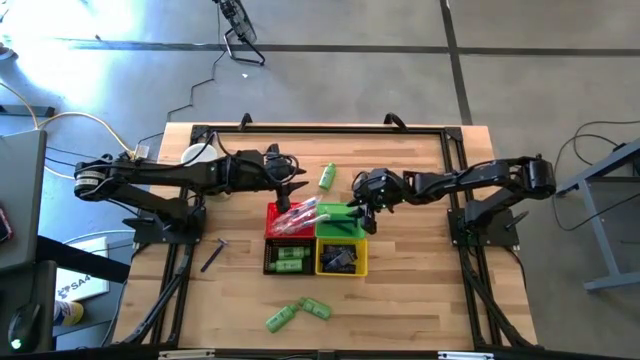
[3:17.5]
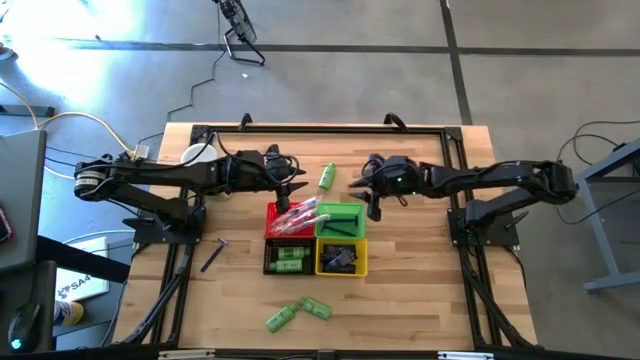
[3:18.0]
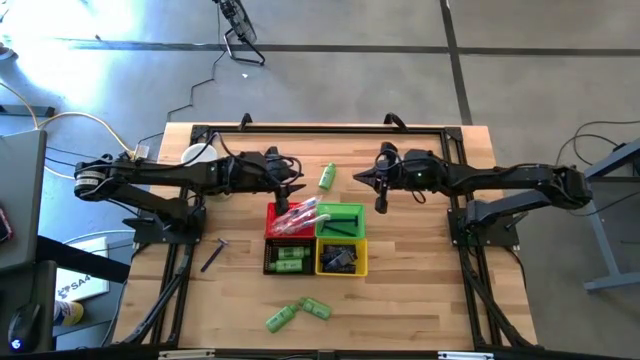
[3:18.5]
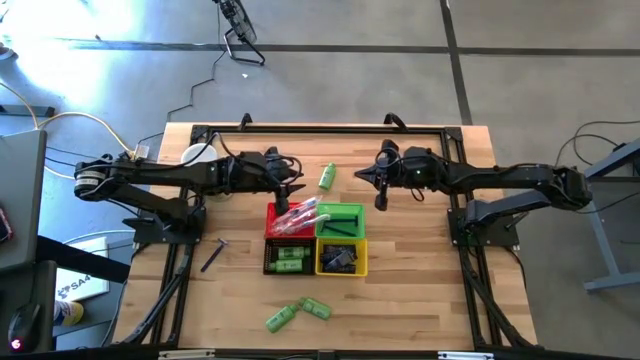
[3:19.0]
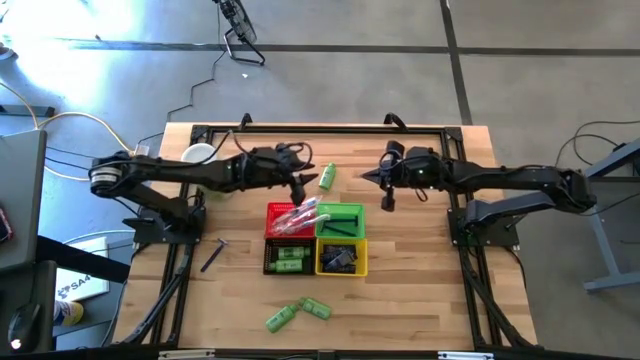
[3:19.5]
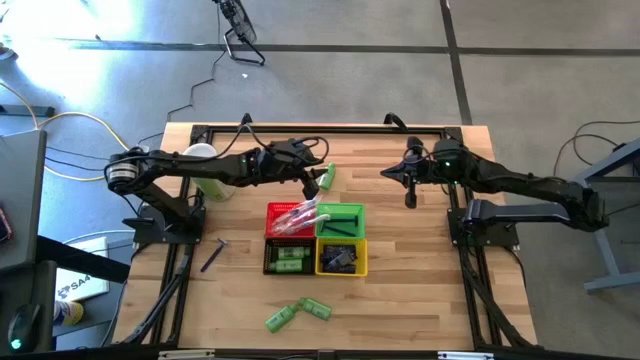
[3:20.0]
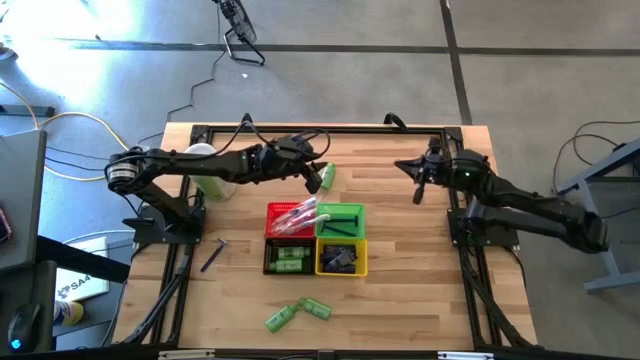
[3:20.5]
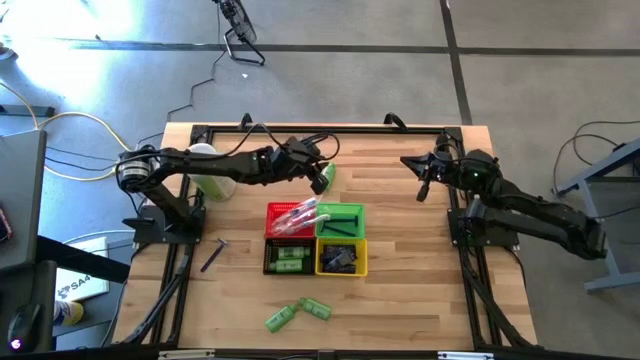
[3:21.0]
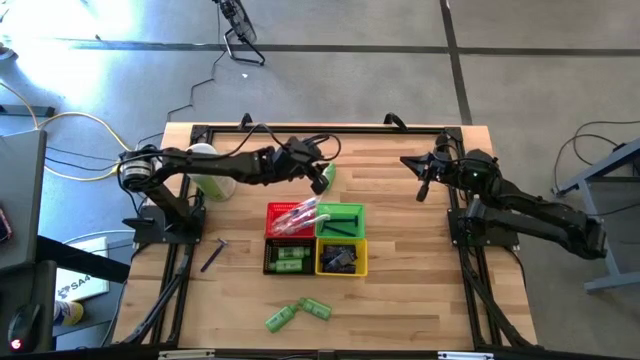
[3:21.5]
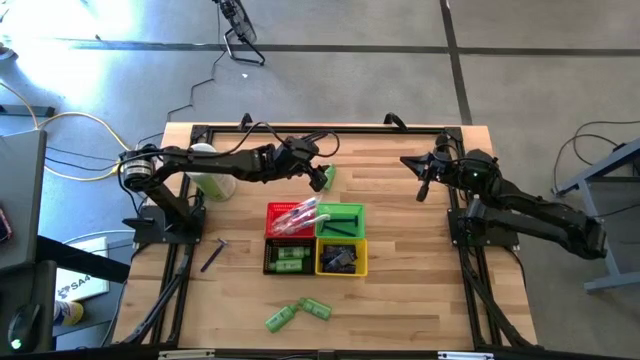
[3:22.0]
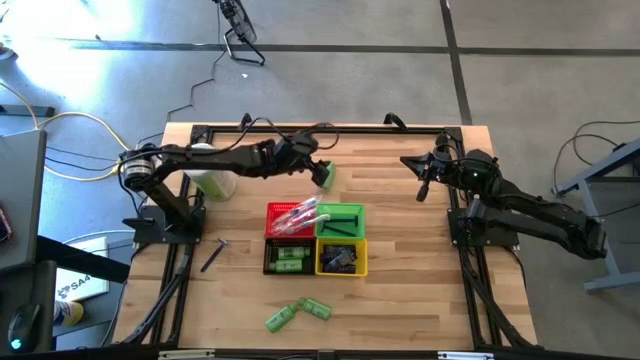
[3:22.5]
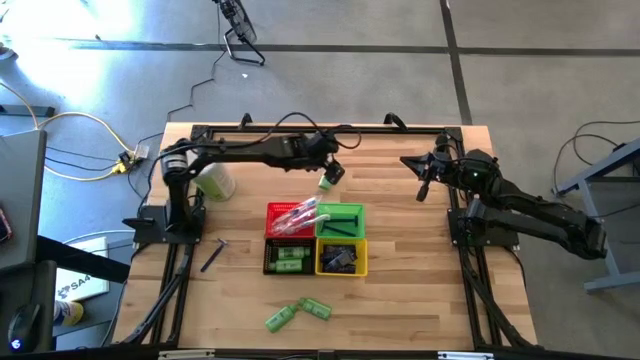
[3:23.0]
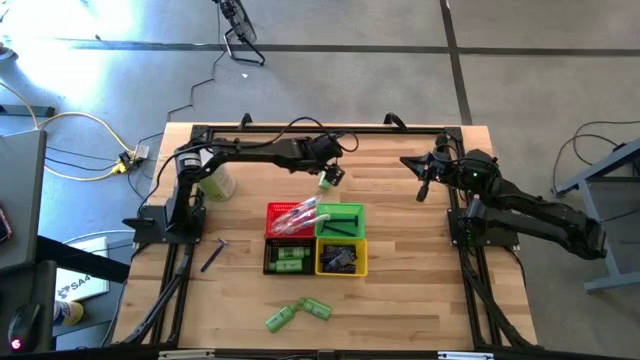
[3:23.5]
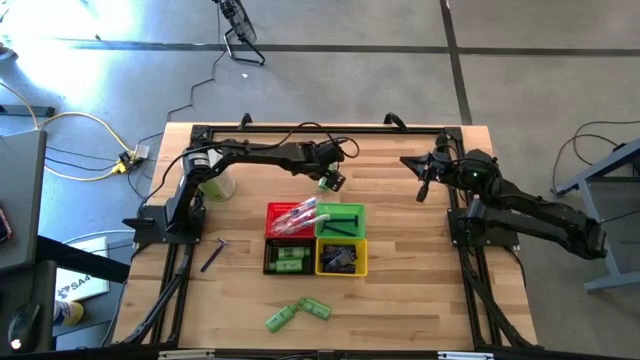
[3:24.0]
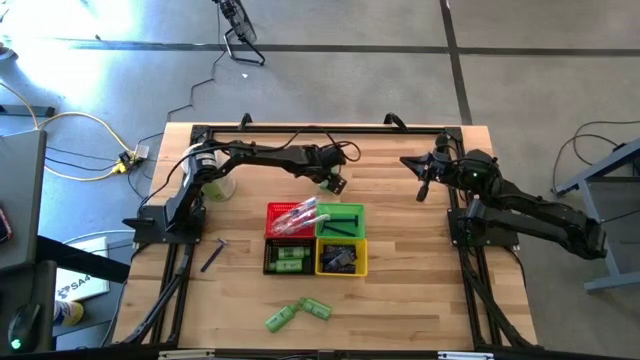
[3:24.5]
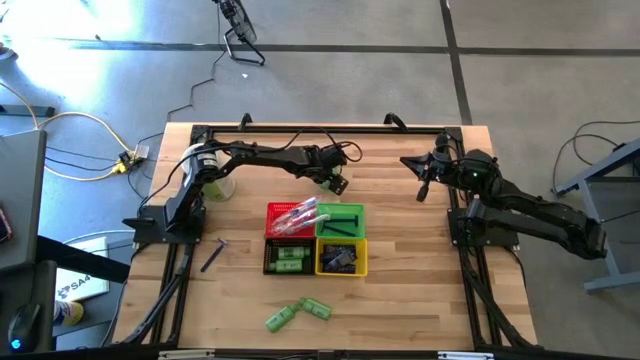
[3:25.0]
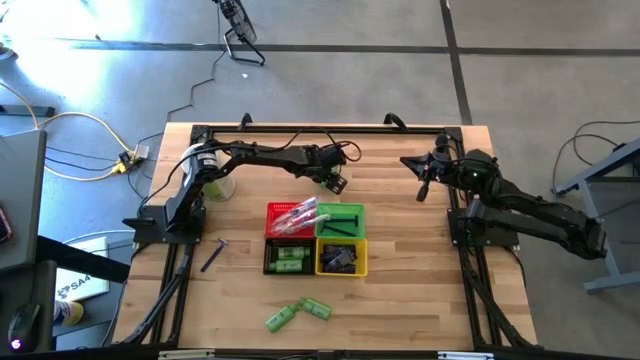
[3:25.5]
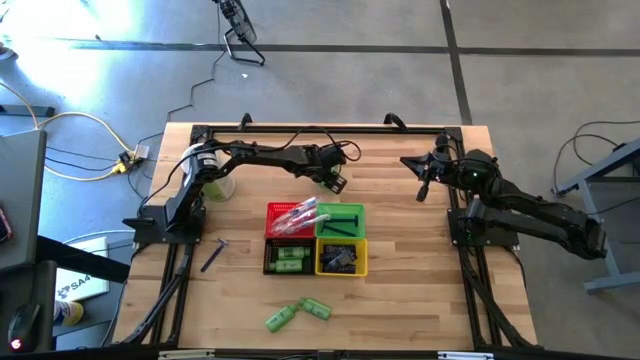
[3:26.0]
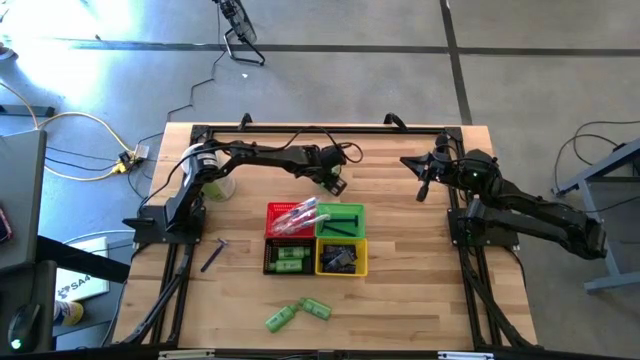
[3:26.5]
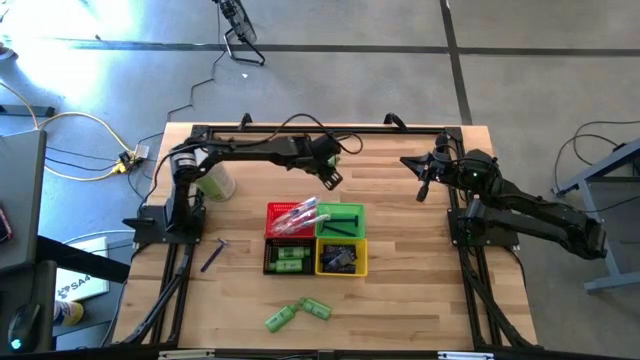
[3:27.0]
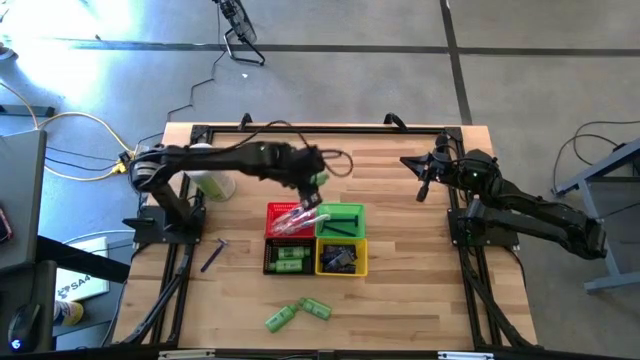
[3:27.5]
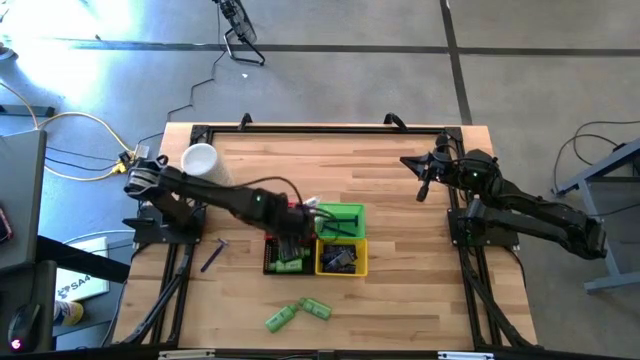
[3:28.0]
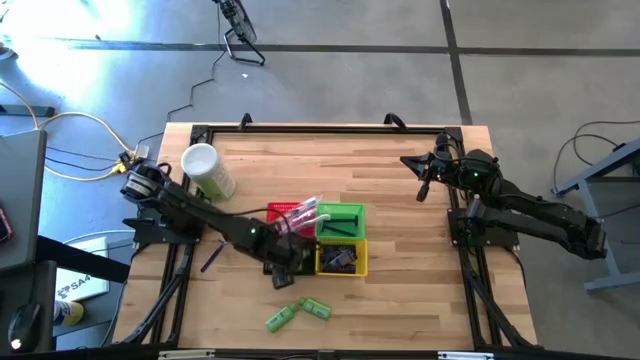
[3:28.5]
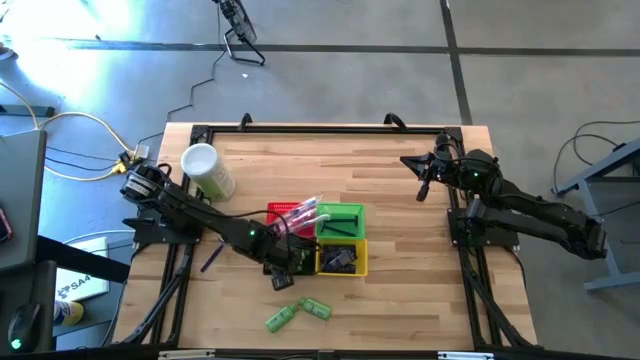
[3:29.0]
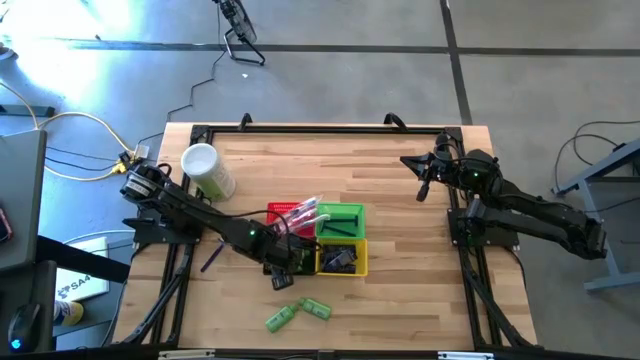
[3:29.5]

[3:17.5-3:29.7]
Task: Pick & Place Travel size toiletries
Put the green shampoo bottle into the black bin

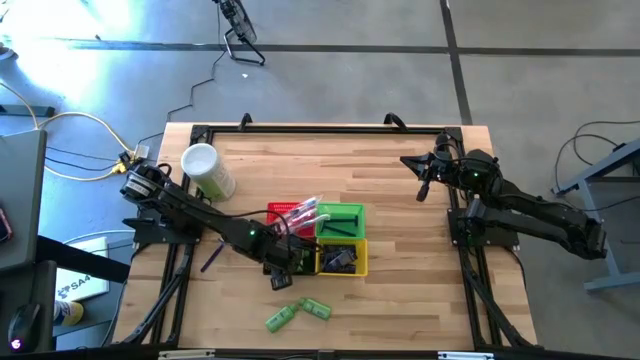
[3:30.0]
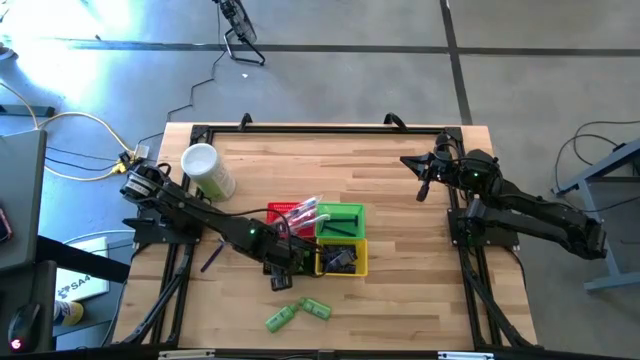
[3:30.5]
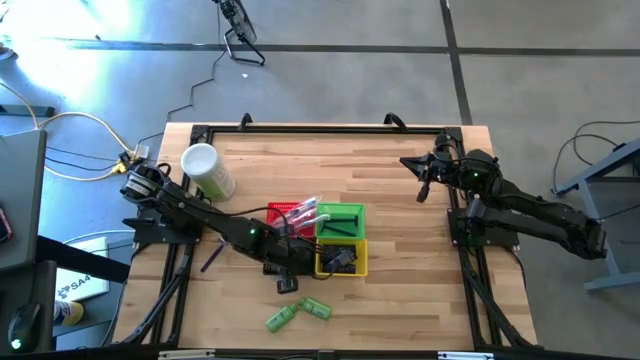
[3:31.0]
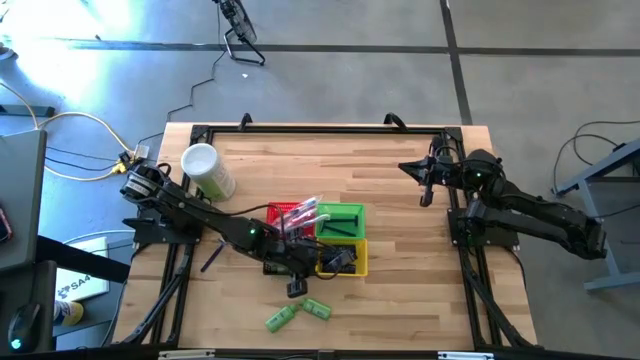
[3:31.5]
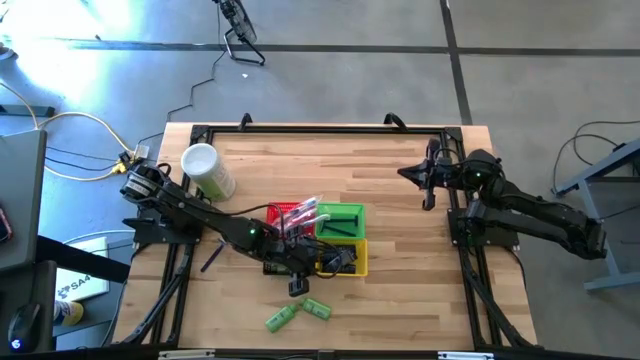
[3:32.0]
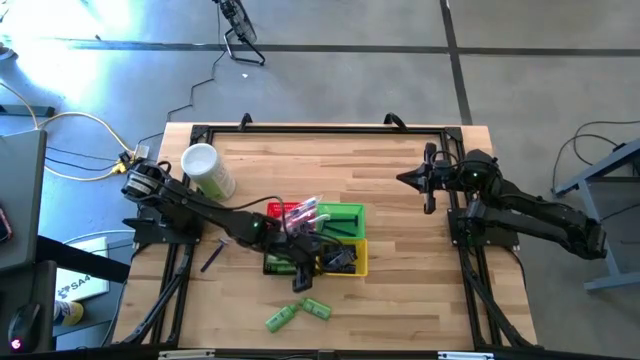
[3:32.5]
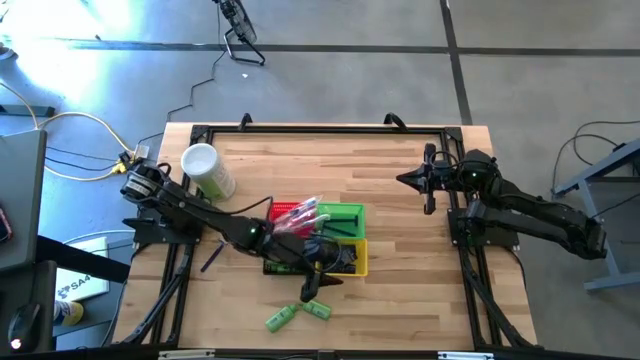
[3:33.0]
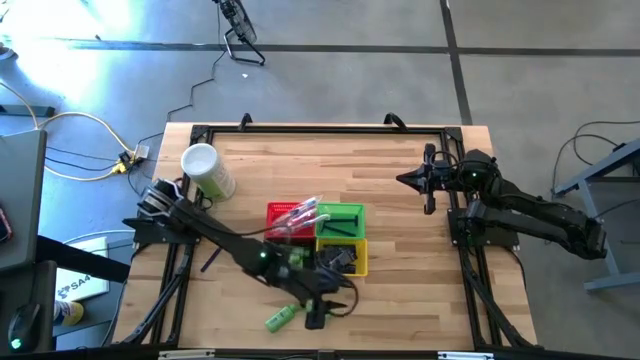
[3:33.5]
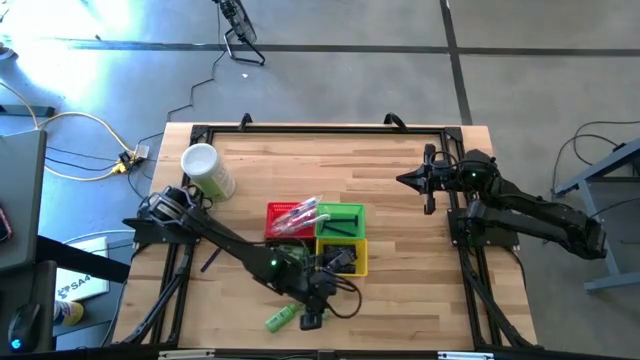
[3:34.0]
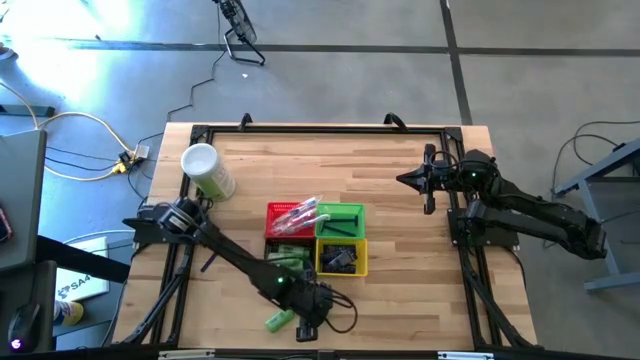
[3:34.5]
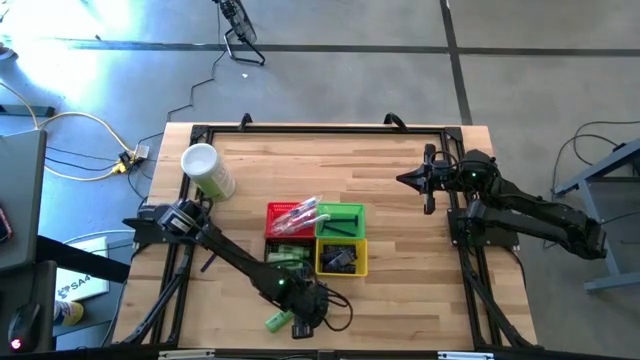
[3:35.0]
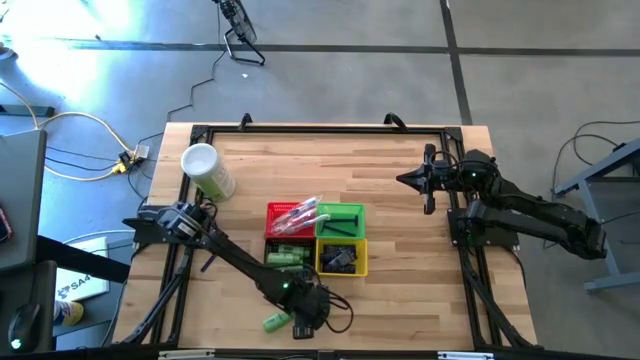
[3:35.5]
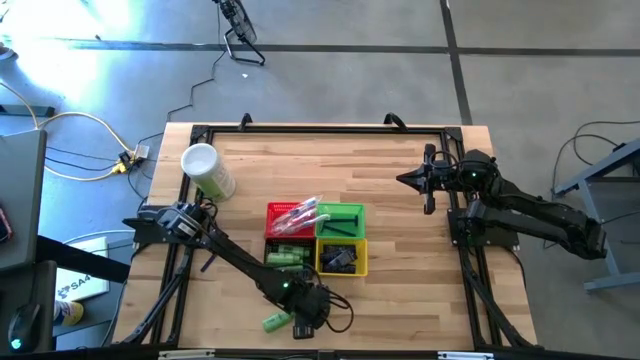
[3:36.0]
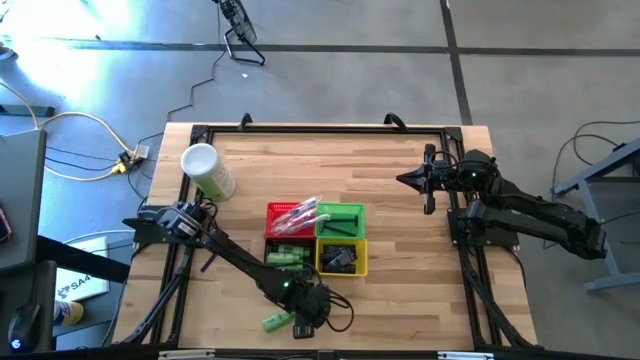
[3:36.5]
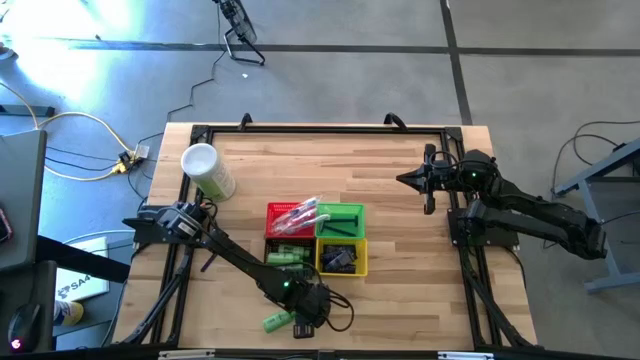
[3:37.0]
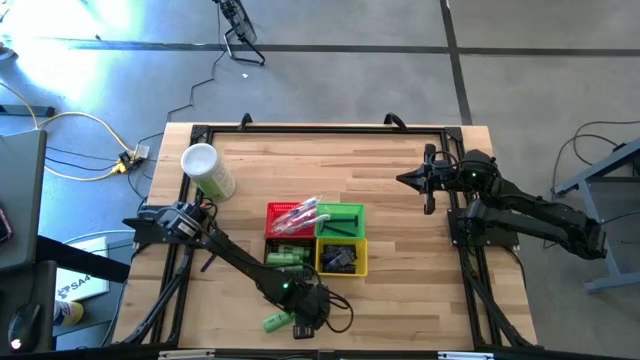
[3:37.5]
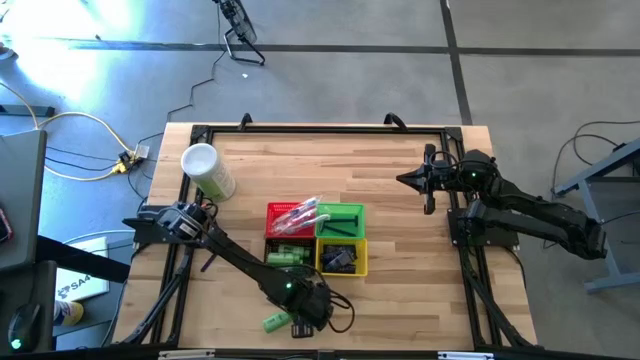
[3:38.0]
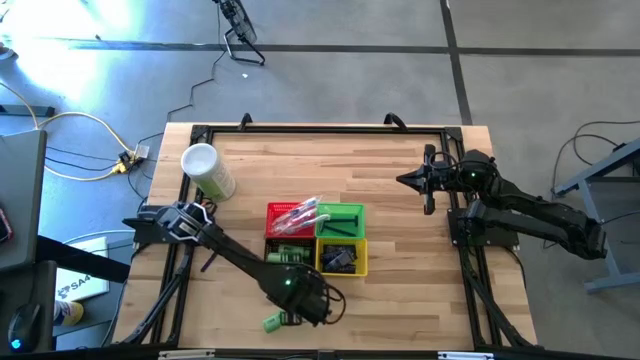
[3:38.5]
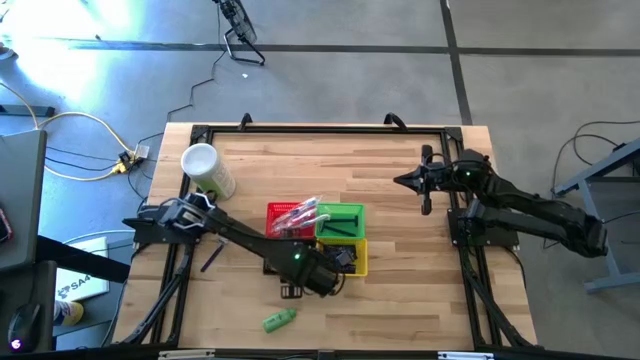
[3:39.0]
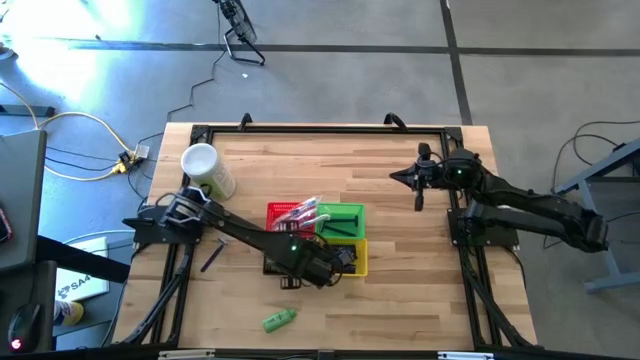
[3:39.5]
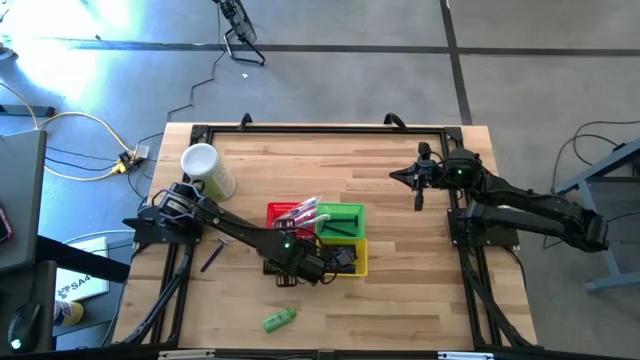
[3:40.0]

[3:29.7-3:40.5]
Put the green shampoo bottle into the black bin
